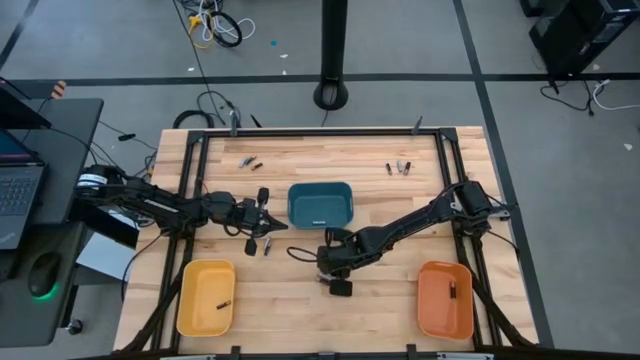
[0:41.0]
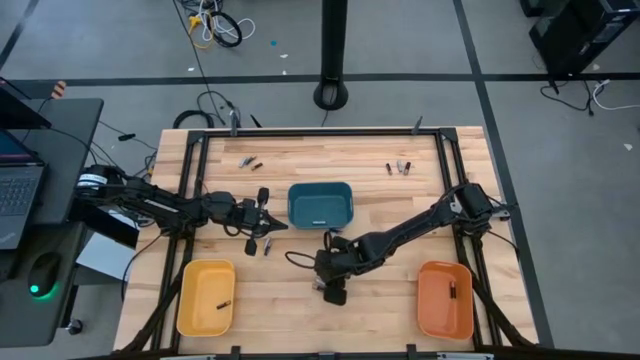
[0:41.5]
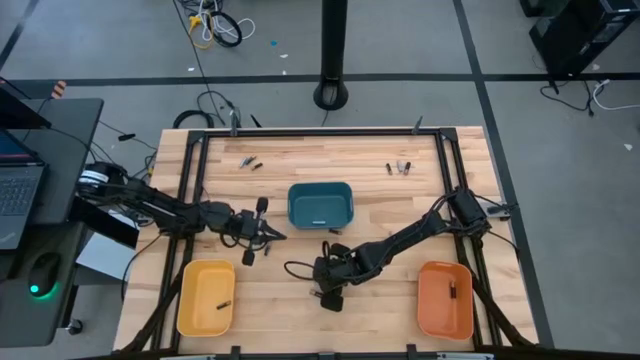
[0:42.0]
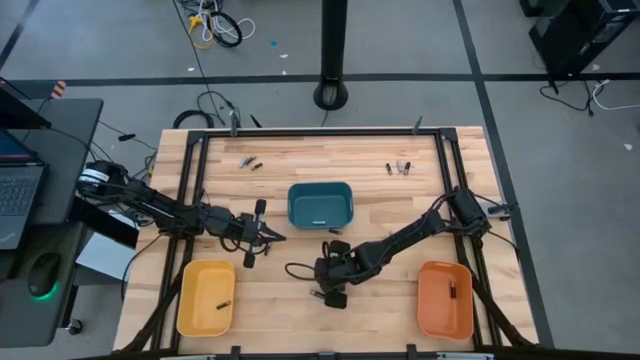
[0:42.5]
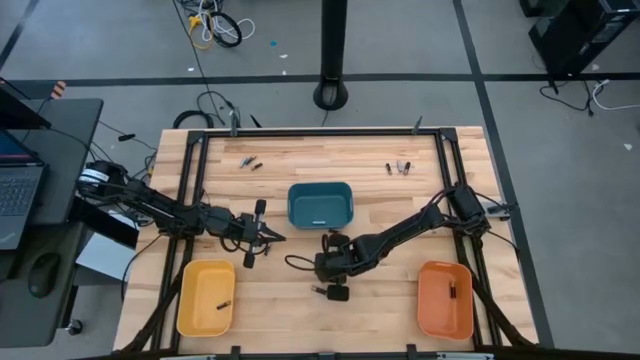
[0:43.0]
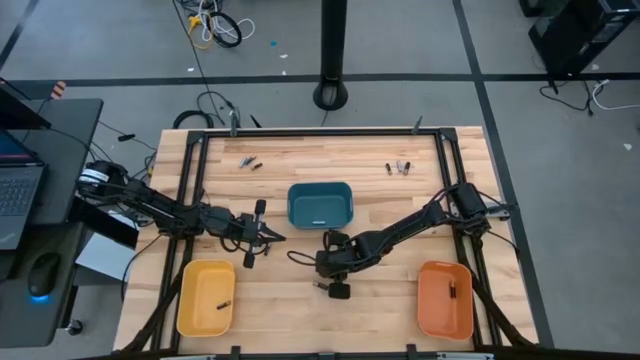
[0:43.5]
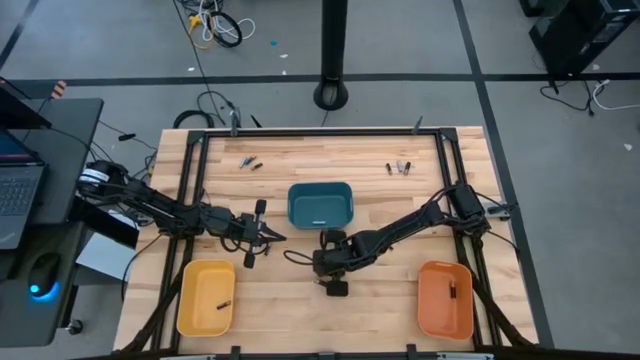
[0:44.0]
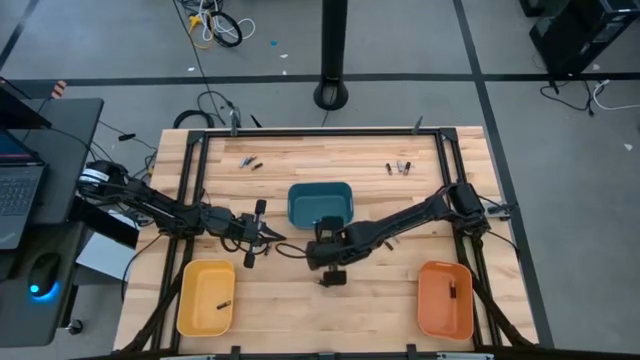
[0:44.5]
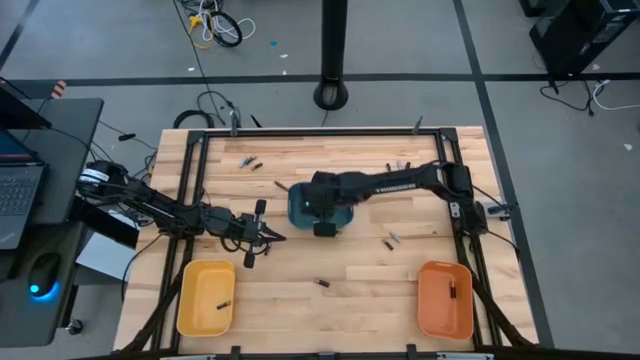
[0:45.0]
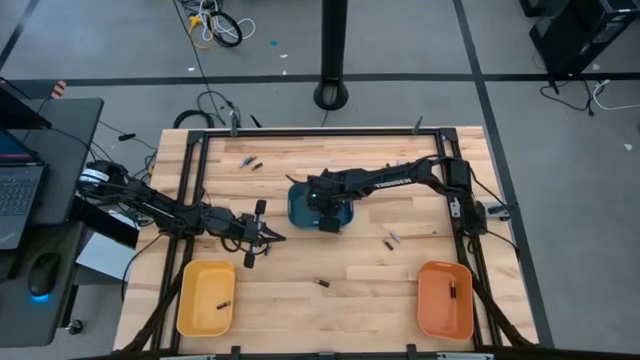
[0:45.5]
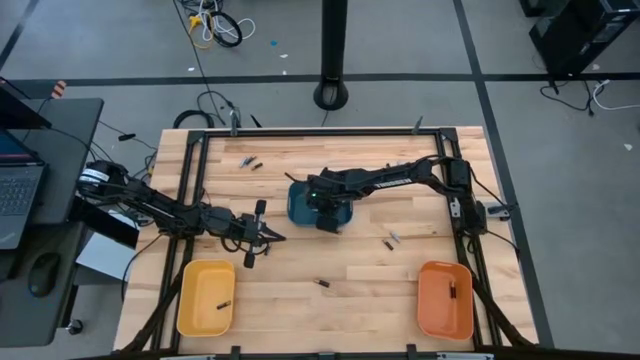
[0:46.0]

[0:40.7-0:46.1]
Task: Sort batteries
Put the silver battery into the blue bin

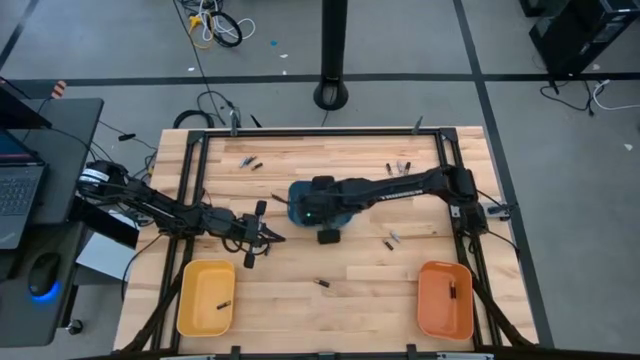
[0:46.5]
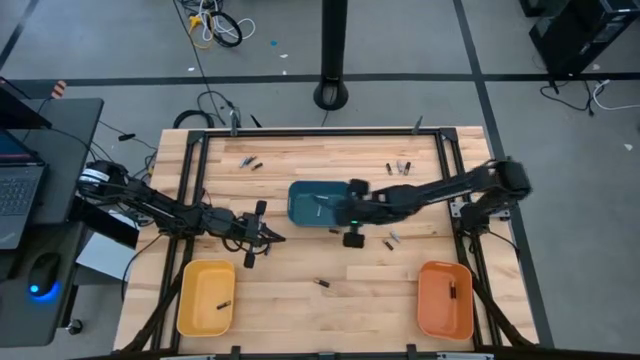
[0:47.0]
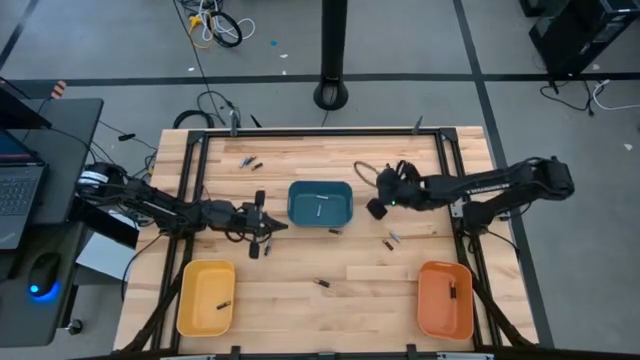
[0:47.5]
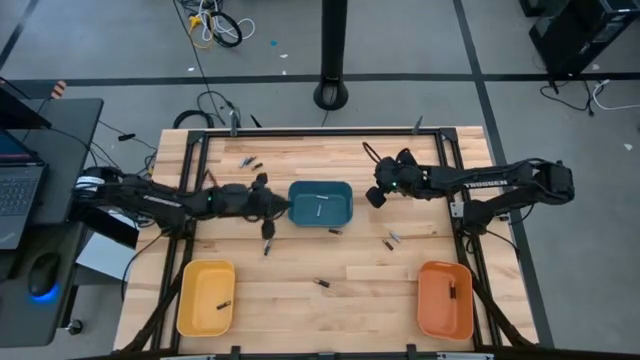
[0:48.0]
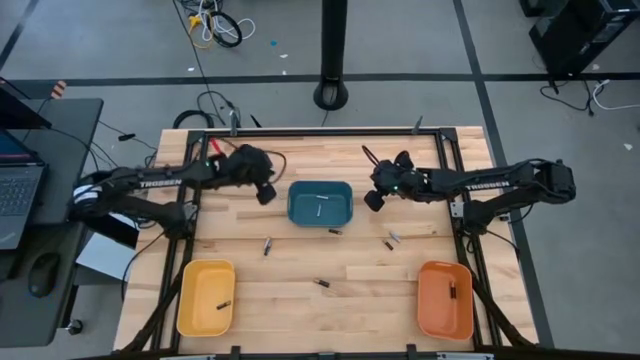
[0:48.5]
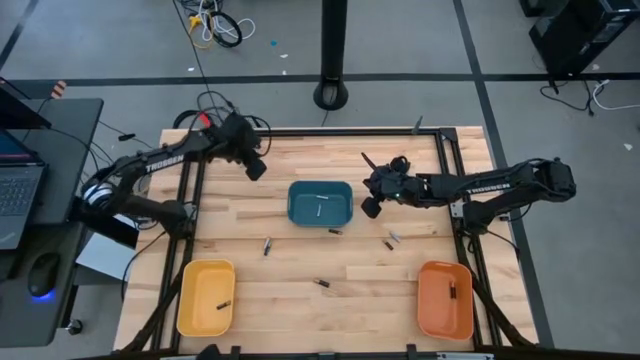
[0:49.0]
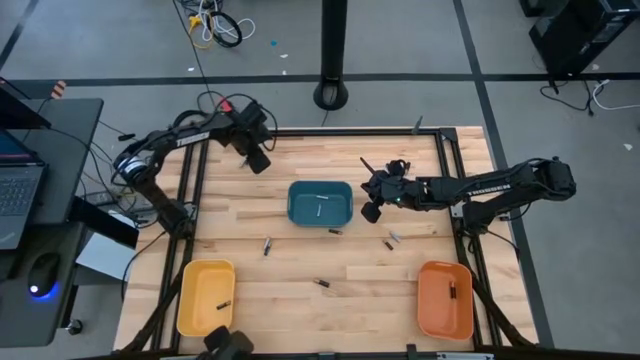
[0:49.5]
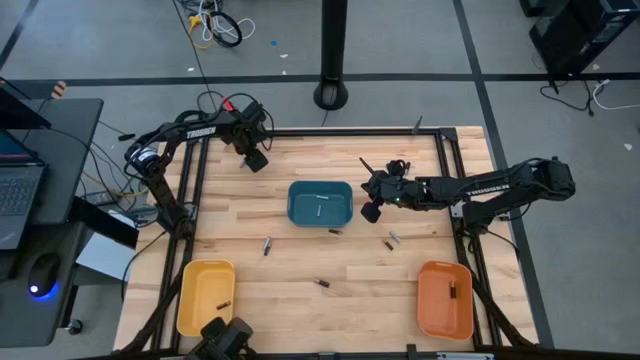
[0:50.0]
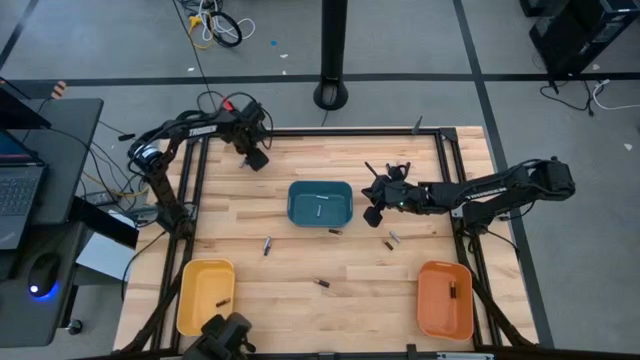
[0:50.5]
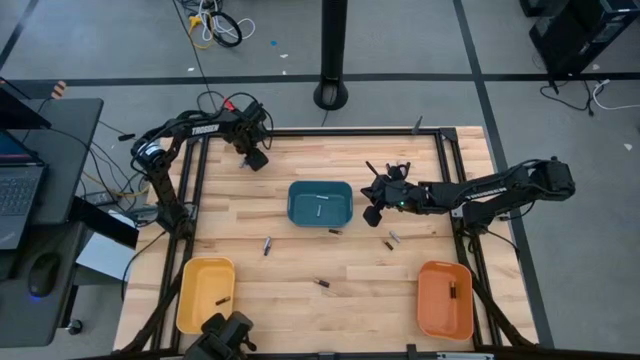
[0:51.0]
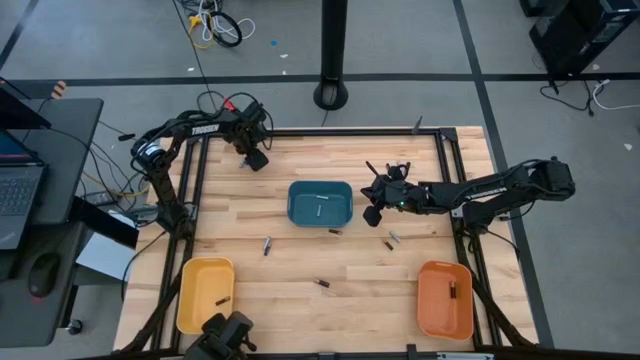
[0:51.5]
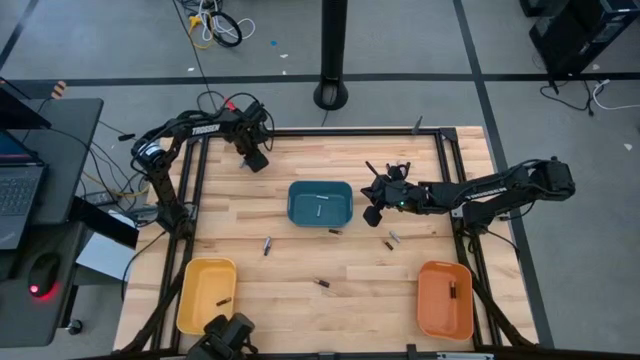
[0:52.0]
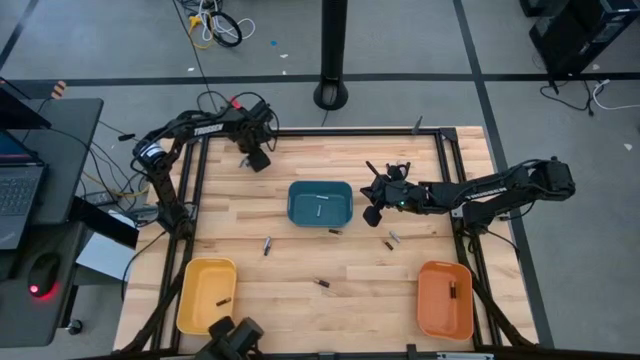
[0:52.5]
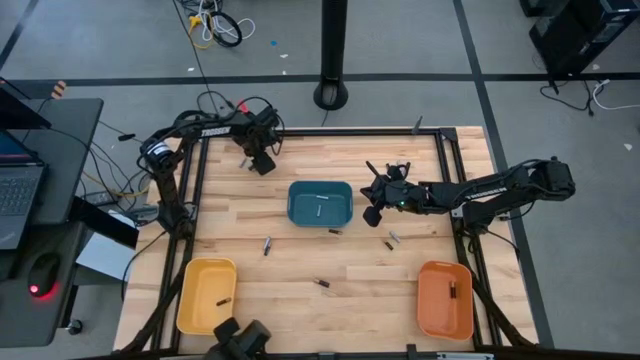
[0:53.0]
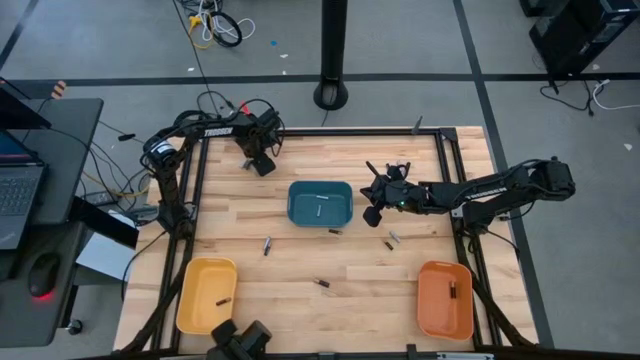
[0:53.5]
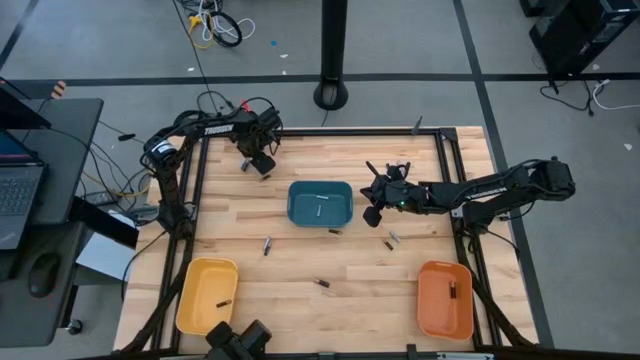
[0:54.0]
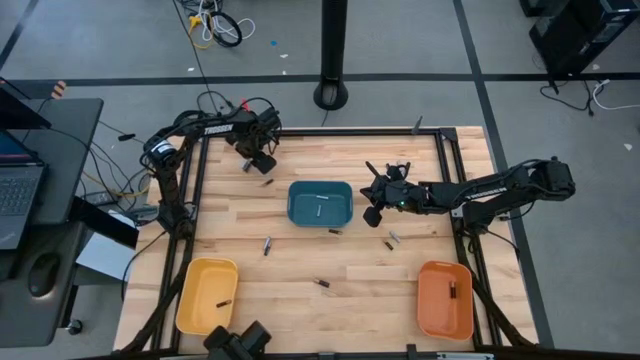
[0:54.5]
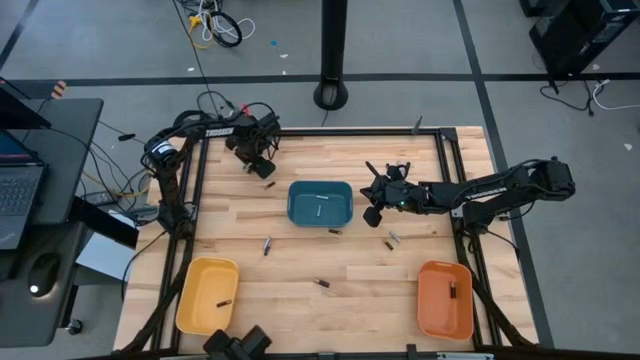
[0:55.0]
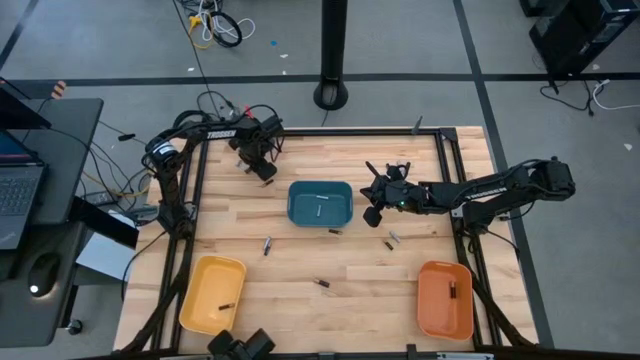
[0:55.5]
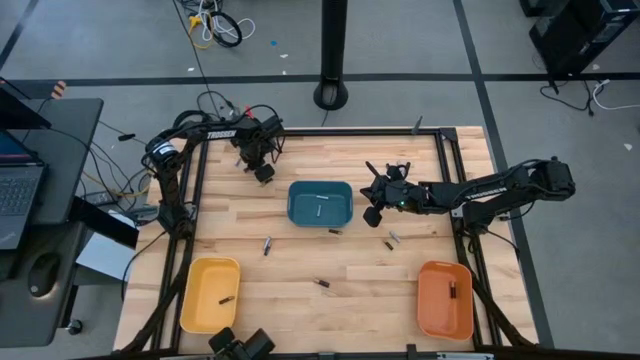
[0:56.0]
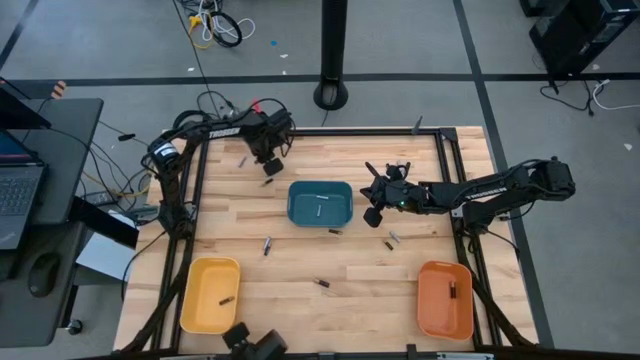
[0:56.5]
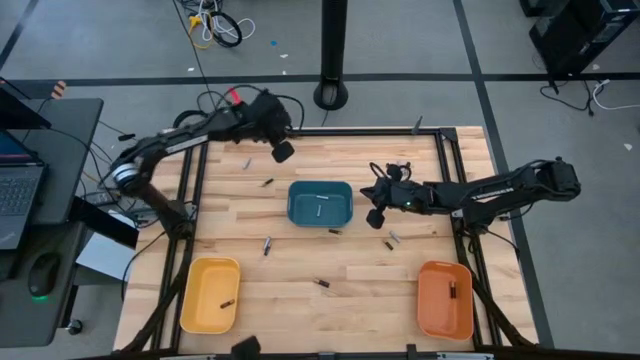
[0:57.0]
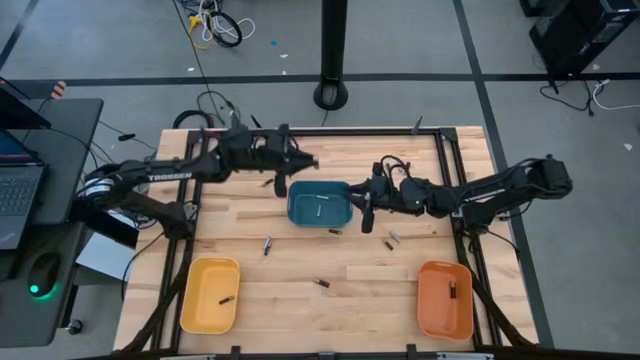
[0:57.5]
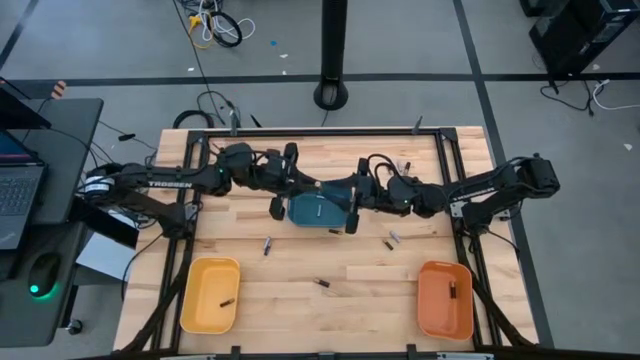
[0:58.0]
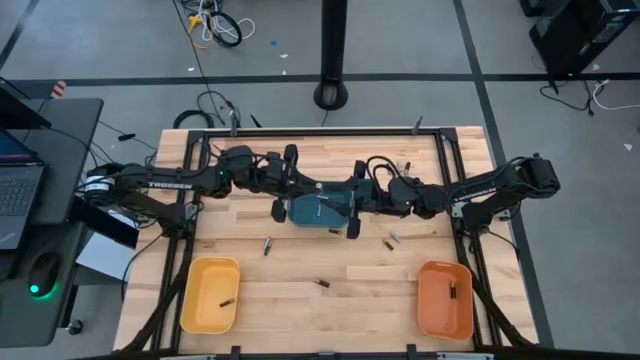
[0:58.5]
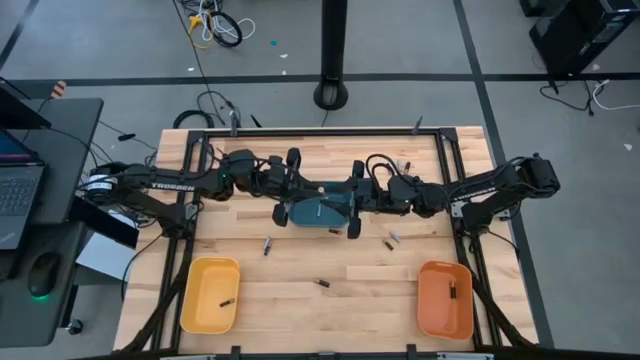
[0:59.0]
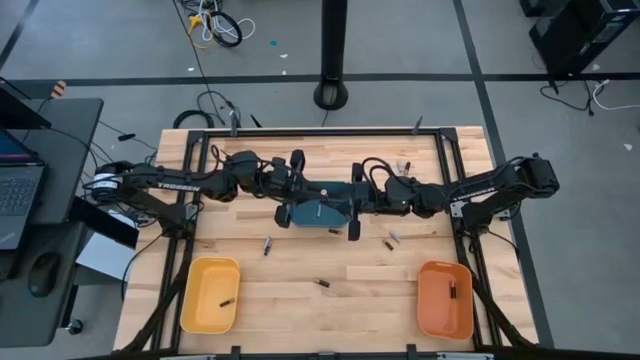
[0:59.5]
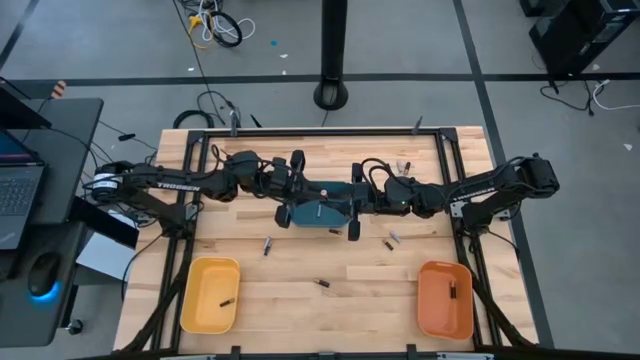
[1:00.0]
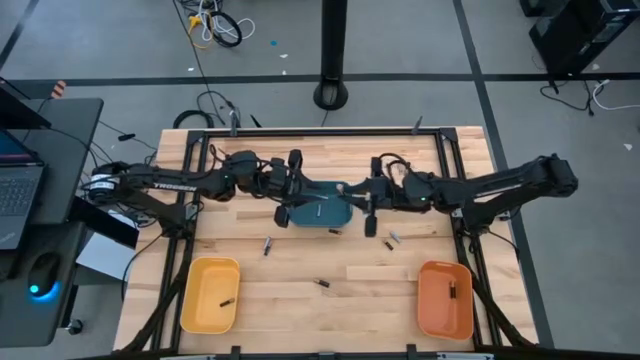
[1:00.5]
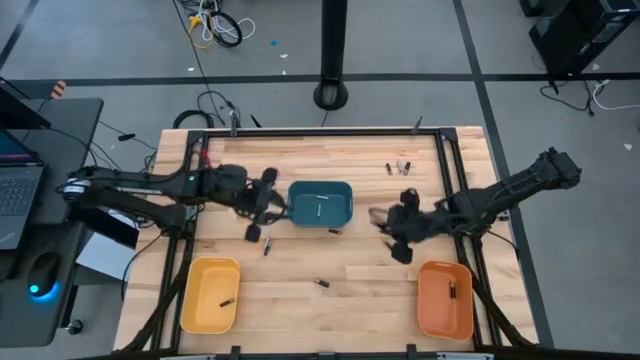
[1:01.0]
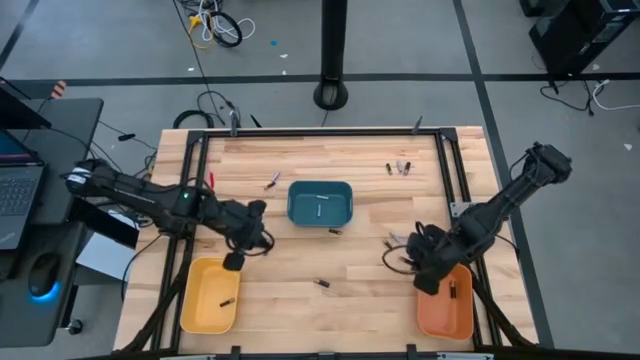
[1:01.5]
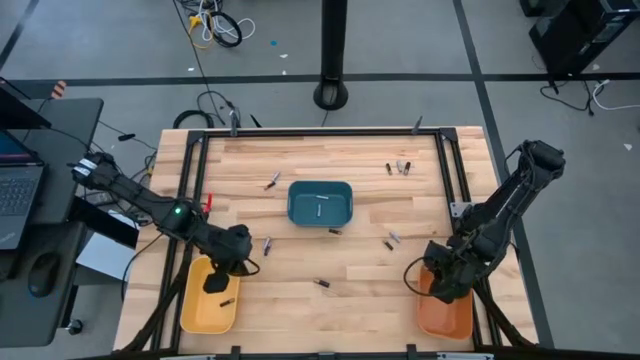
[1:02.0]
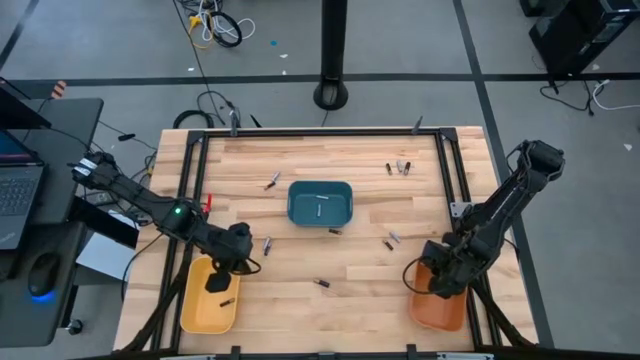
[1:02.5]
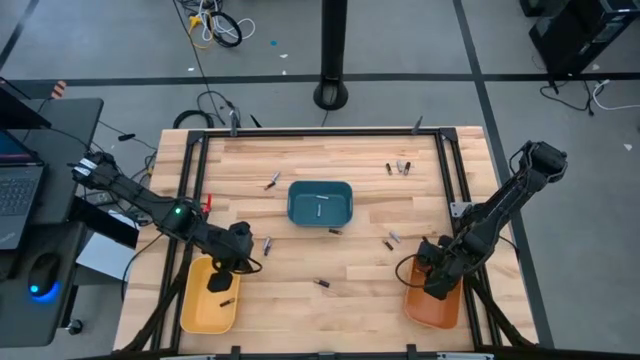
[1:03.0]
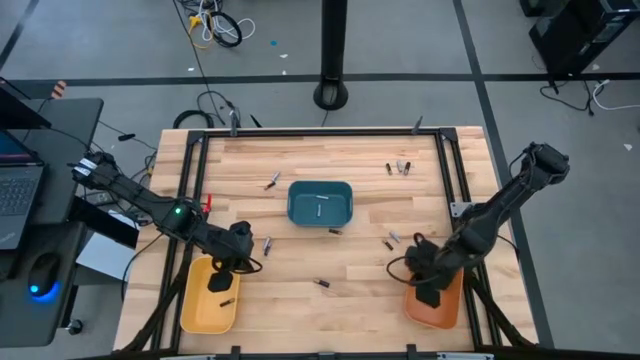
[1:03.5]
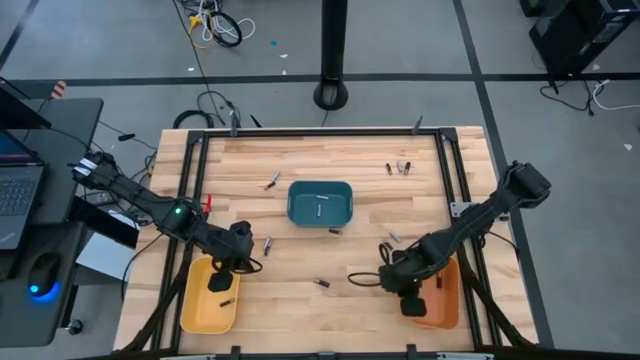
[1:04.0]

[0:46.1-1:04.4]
Put the large black battery into the orange bin
